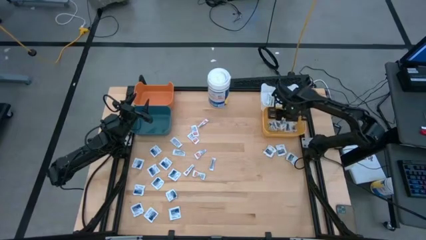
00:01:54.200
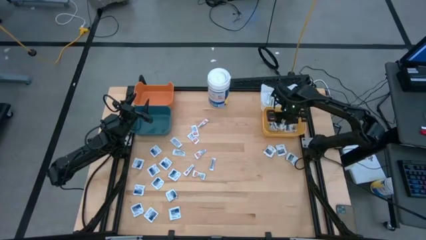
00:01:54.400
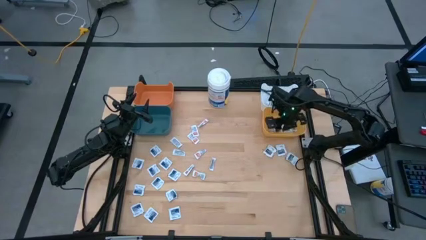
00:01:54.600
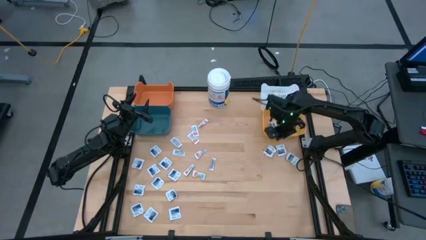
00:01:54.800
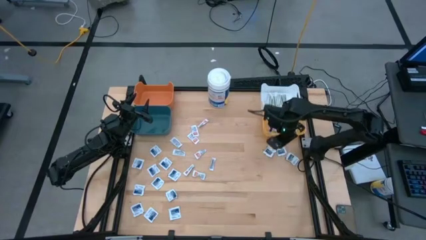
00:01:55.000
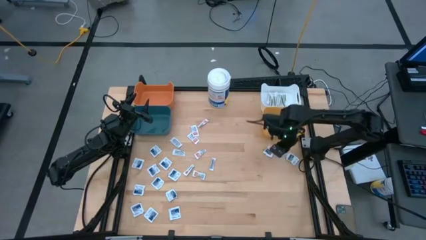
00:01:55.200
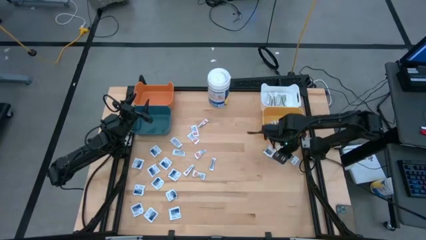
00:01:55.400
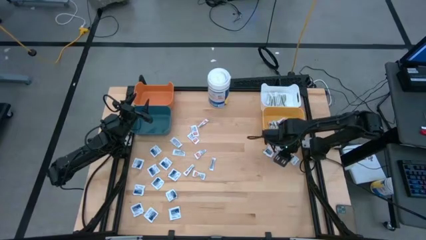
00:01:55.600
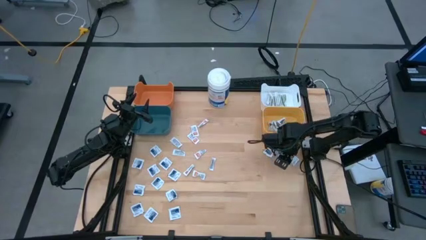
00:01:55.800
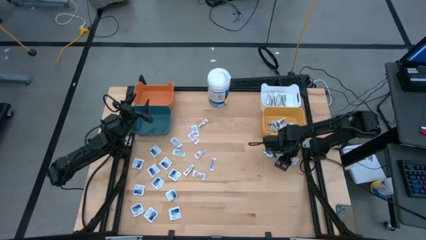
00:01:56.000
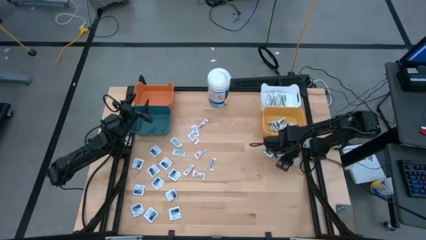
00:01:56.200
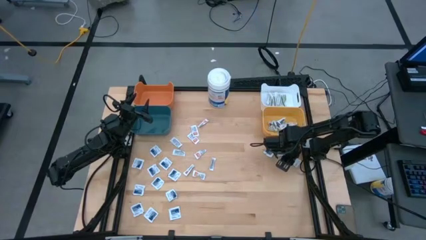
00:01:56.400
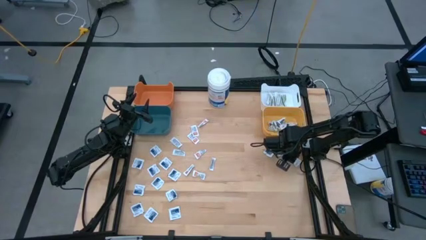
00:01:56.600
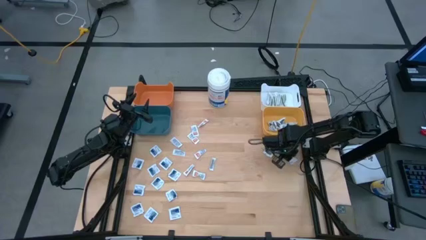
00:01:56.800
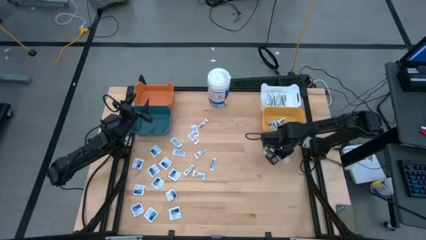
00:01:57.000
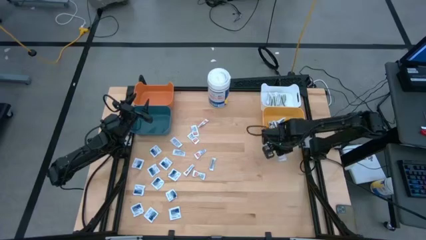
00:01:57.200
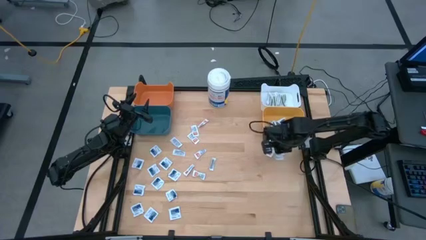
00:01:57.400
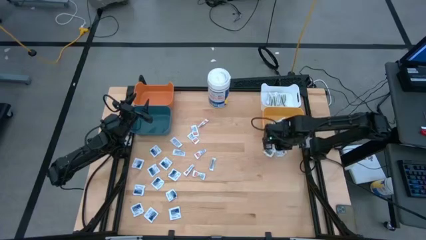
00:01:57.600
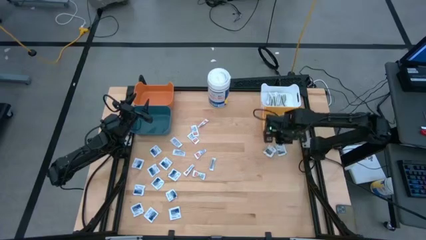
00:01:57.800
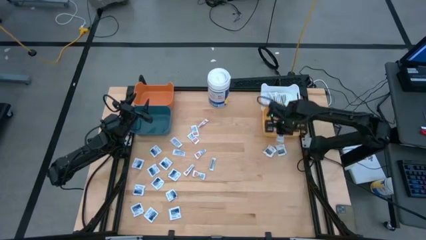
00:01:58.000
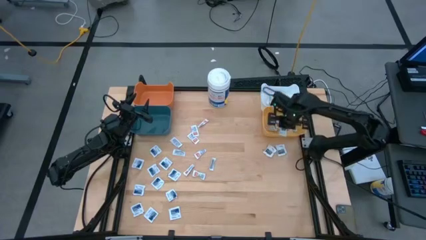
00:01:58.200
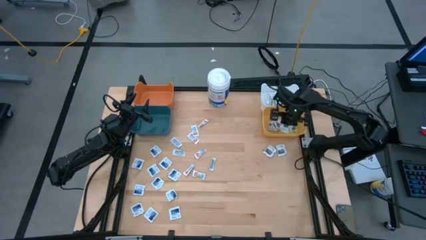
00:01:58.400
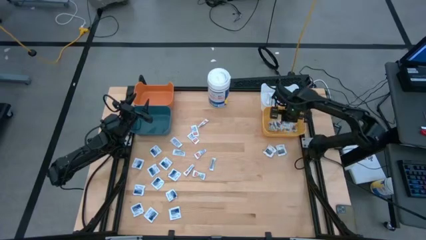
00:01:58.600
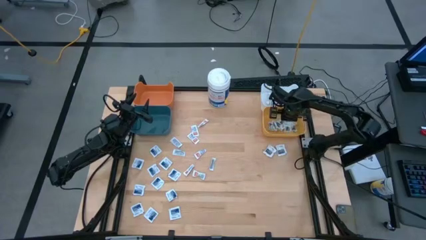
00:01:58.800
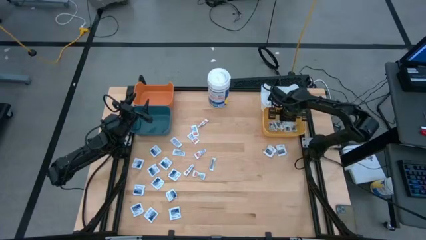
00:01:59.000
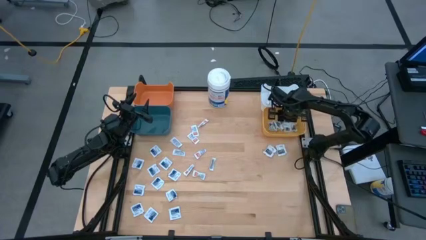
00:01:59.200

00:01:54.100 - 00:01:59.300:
Task: Pick & Place First Aid Supplies
Put the black pad into the yellow bin

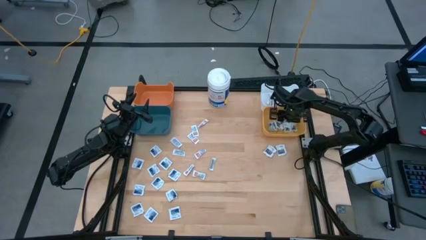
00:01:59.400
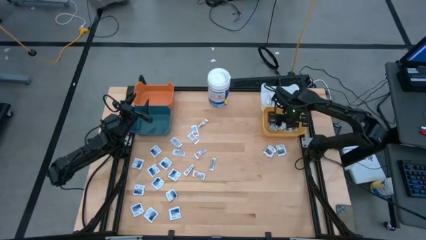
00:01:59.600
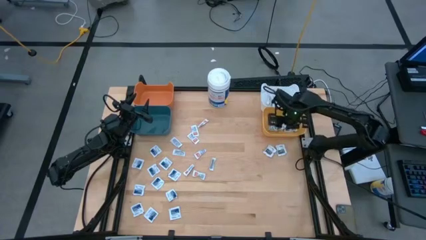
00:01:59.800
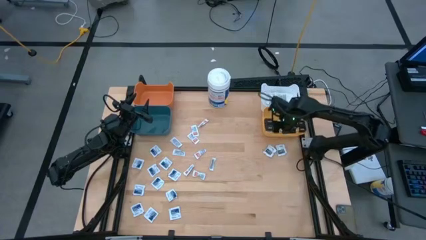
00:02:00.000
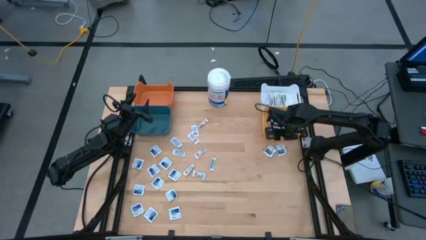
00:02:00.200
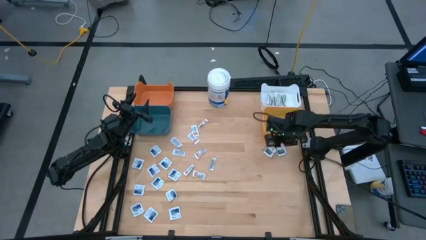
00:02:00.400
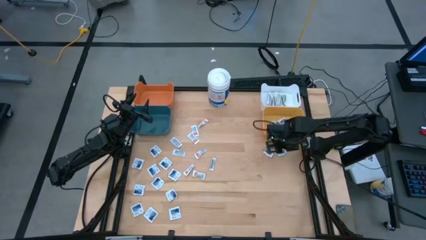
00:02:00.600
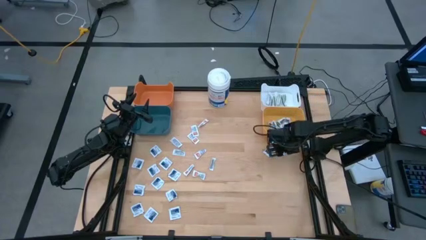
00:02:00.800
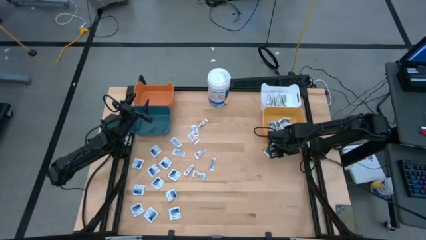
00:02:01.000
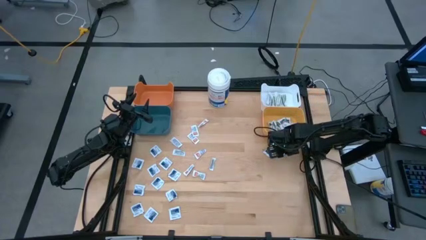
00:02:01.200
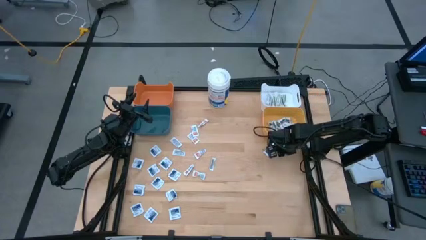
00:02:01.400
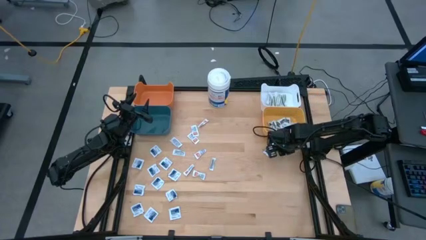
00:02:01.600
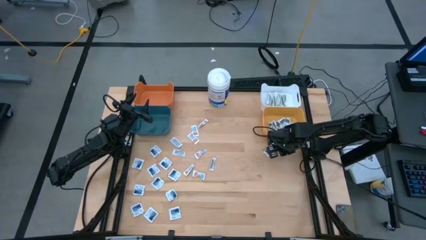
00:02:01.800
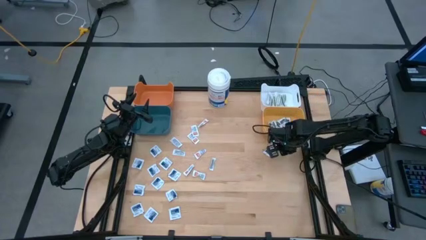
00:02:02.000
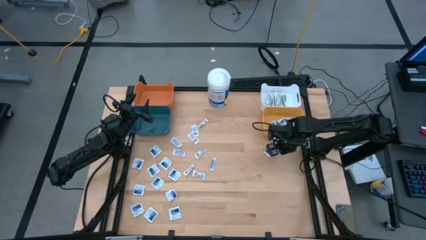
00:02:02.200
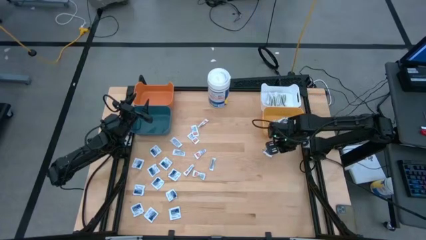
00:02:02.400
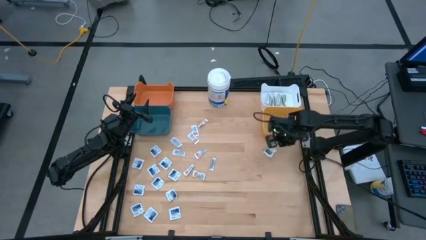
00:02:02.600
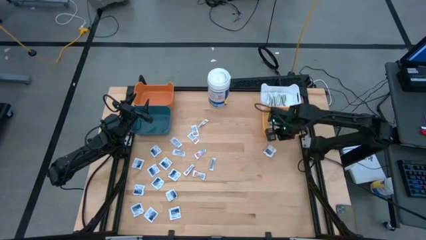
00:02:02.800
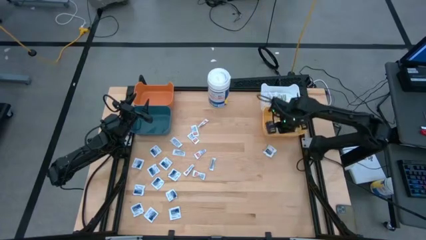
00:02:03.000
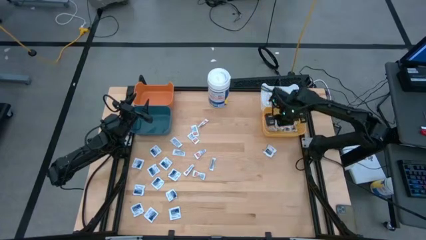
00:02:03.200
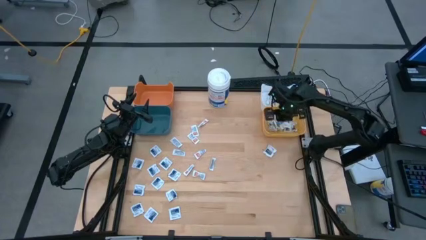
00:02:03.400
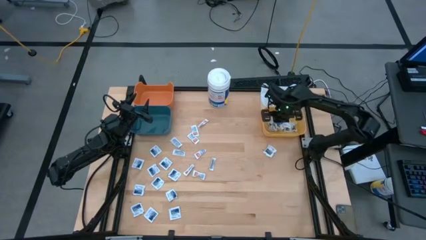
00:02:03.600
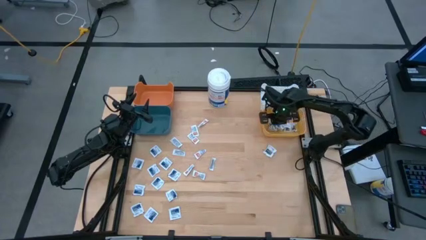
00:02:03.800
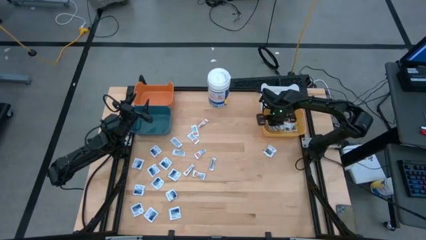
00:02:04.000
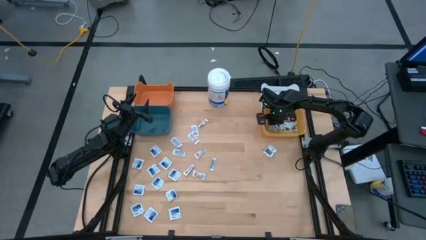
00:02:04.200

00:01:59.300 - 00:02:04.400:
Put the black pad into the yellow bin

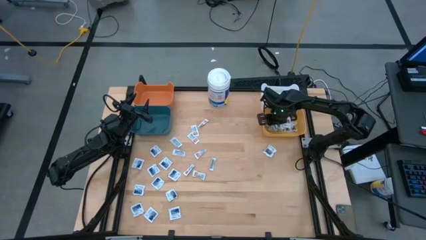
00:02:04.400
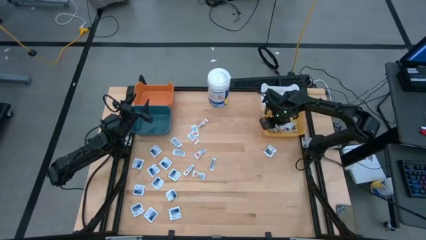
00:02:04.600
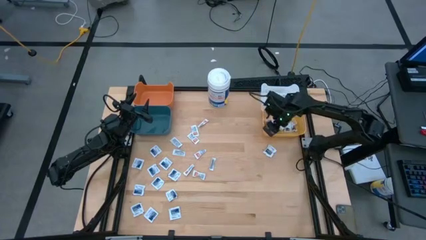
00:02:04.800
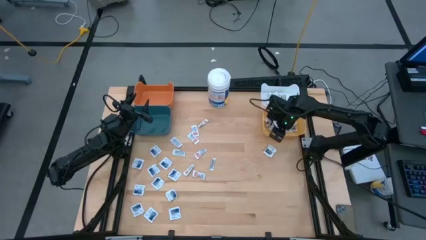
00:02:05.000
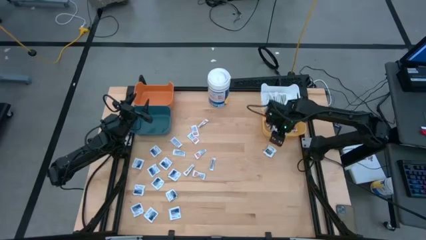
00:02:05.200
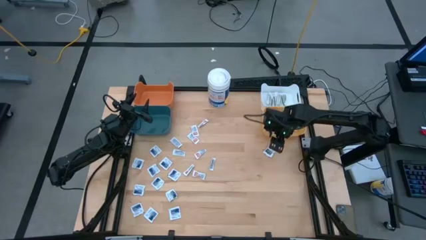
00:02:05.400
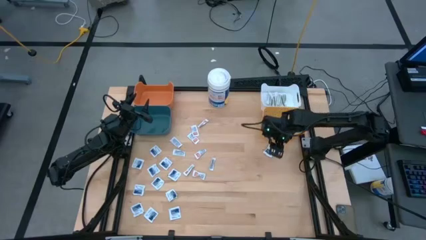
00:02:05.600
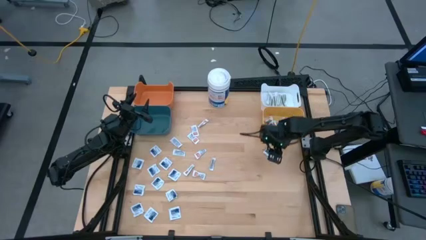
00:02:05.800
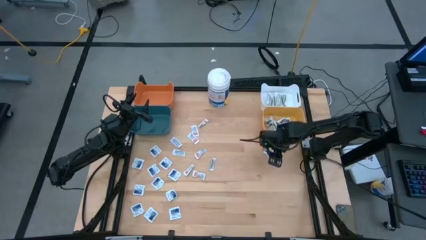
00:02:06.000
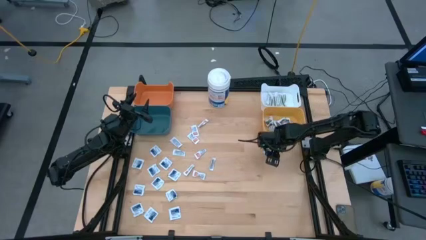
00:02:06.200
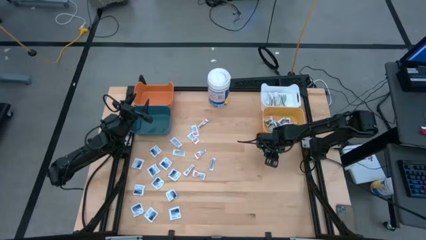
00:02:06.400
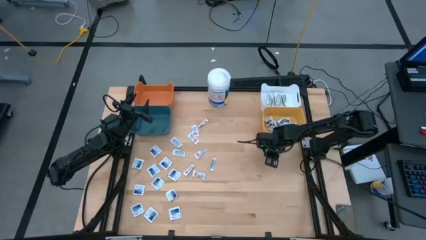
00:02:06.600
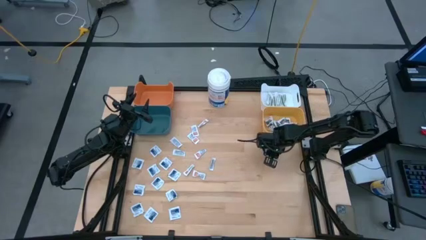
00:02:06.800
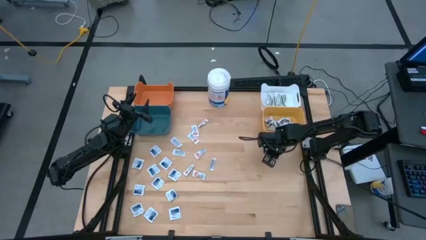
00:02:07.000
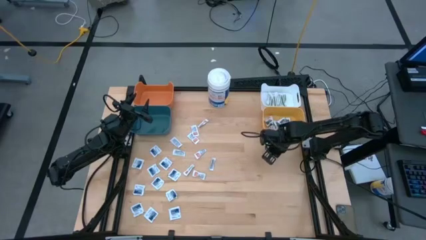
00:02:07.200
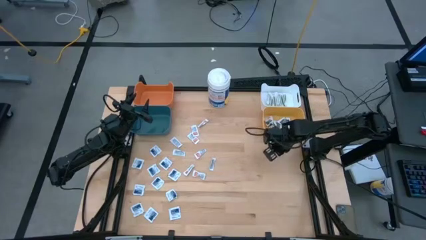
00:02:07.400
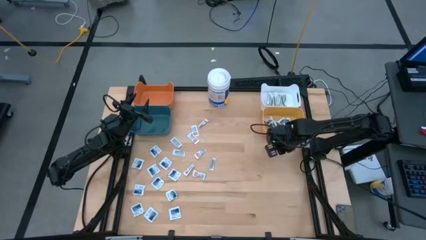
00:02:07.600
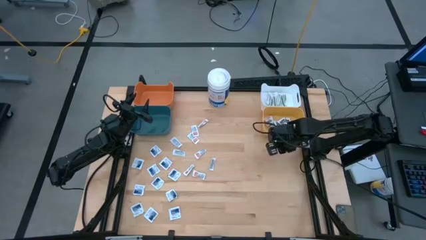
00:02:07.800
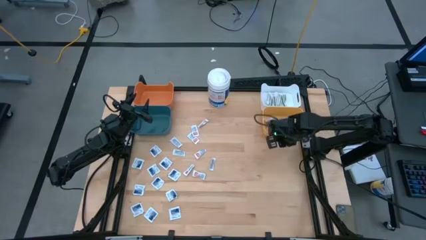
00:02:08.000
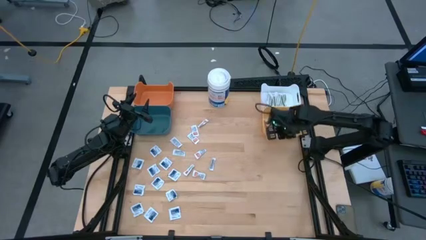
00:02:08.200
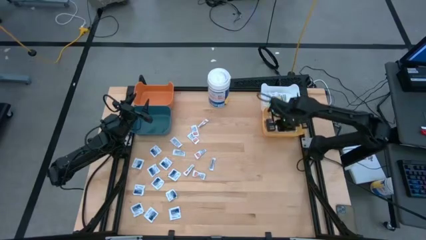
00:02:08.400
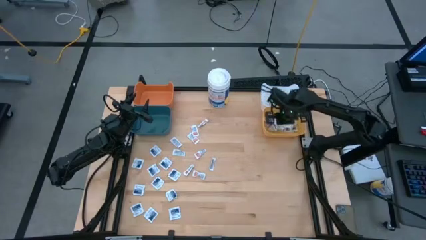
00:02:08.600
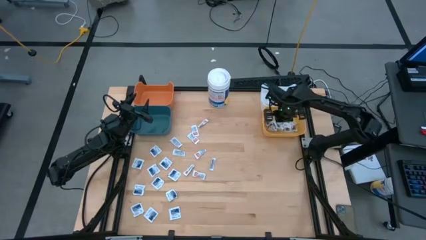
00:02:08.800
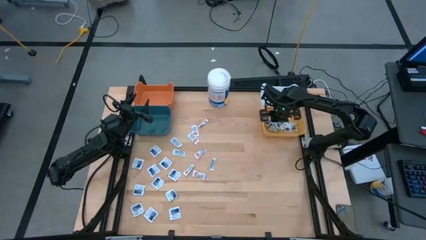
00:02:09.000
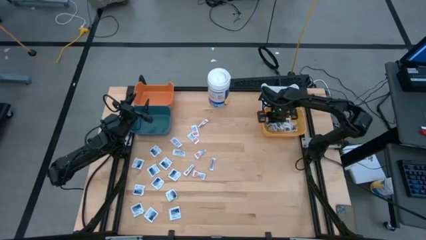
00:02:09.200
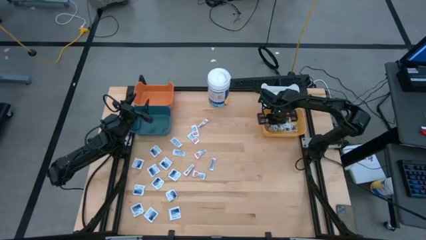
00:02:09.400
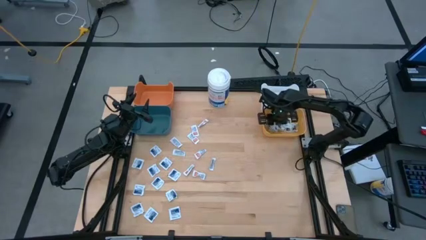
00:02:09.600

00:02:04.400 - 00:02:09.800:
Put the black pad into the yellow bin

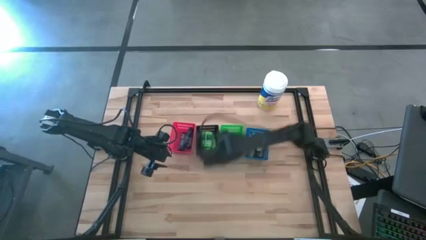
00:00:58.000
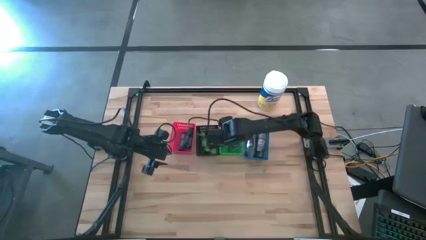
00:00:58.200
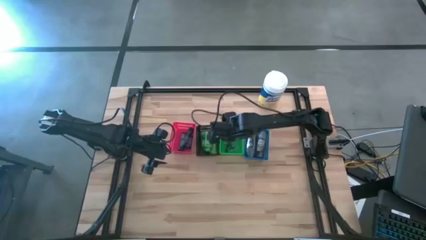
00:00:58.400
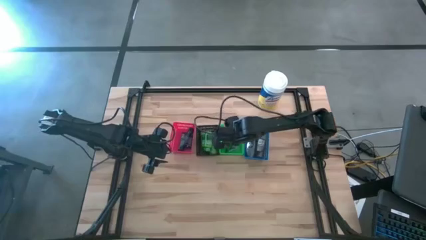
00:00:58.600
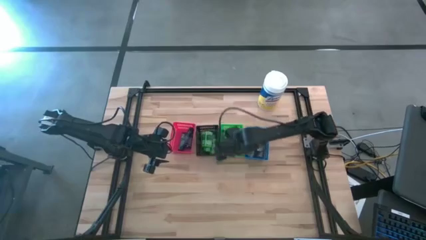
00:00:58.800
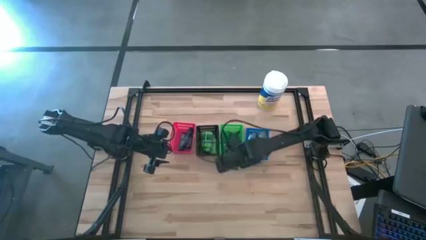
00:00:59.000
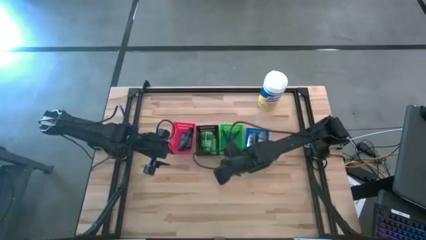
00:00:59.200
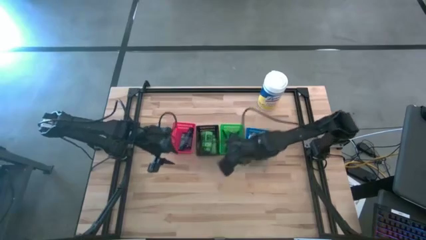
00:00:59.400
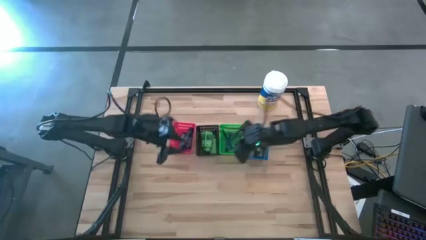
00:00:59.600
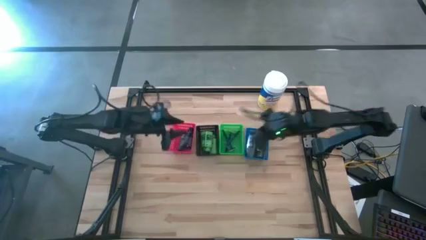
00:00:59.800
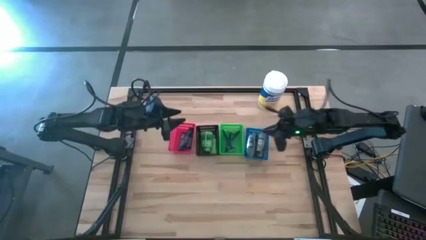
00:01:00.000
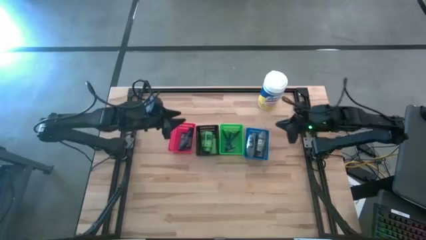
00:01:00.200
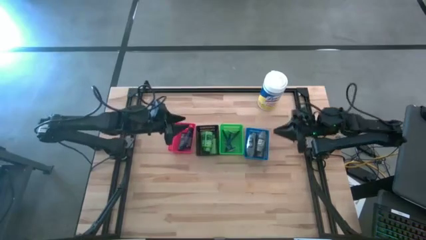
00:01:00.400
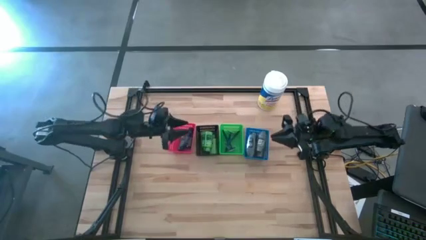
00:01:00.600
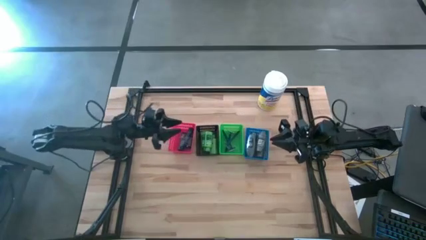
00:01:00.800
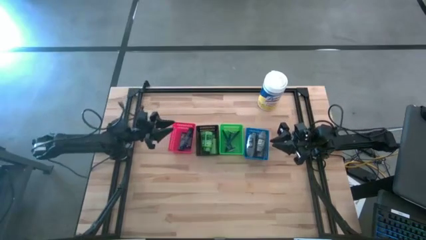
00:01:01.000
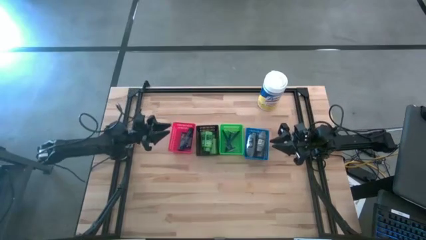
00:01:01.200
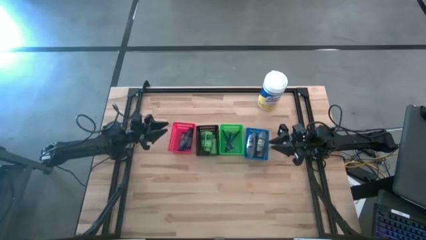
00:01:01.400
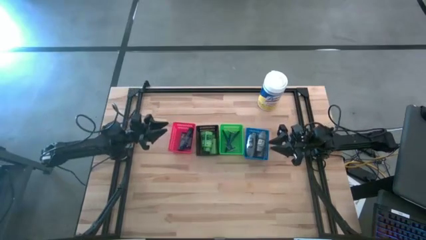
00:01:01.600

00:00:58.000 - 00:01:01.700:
Task: Pick & Place Travel size toiletries
Return to Home Position
